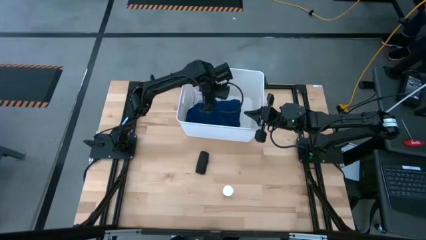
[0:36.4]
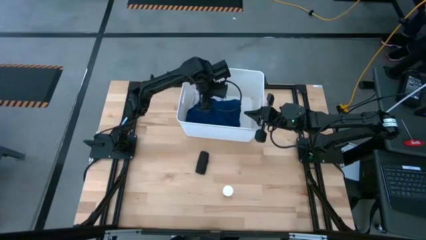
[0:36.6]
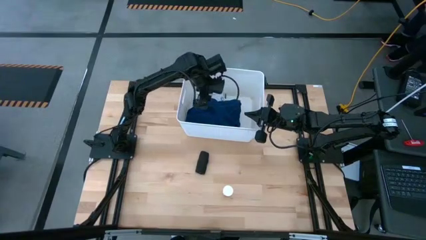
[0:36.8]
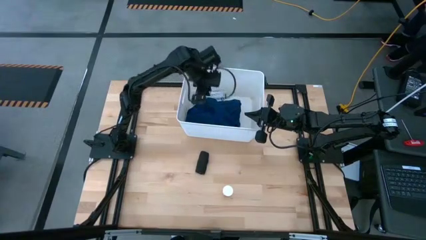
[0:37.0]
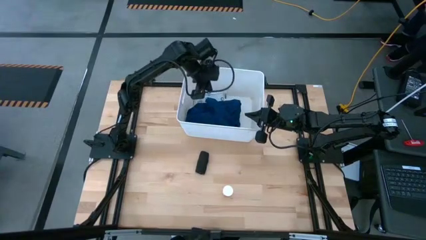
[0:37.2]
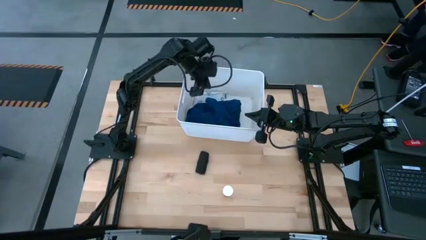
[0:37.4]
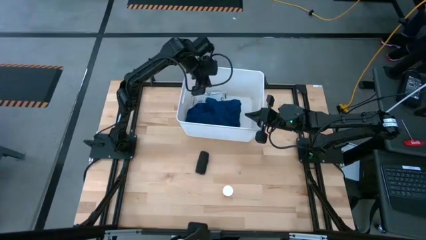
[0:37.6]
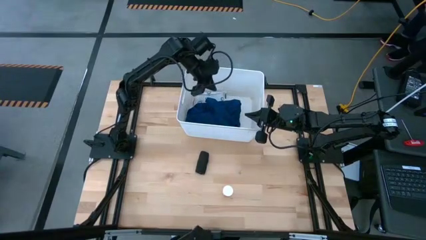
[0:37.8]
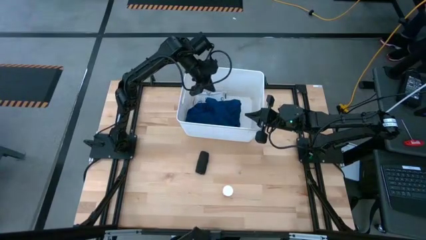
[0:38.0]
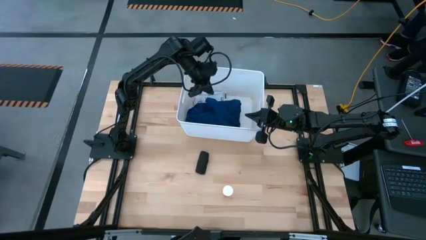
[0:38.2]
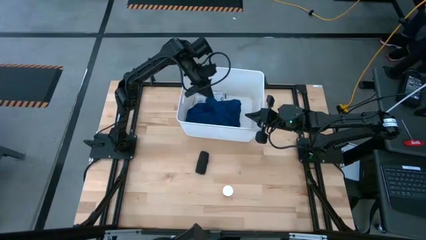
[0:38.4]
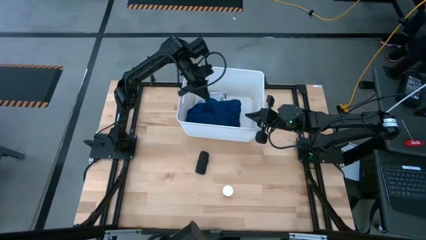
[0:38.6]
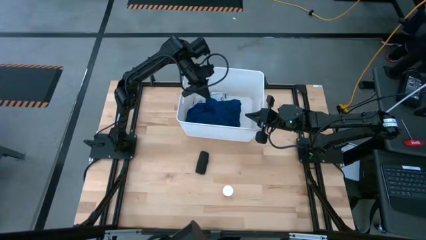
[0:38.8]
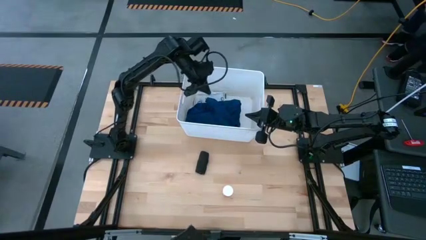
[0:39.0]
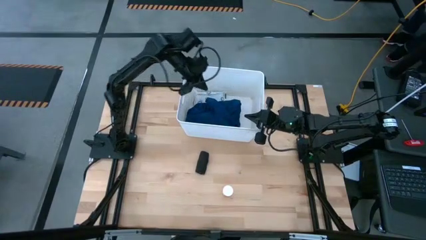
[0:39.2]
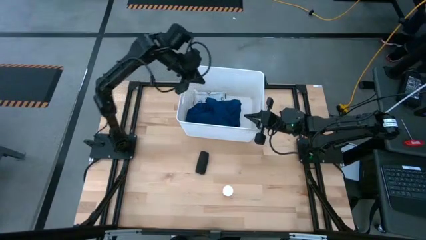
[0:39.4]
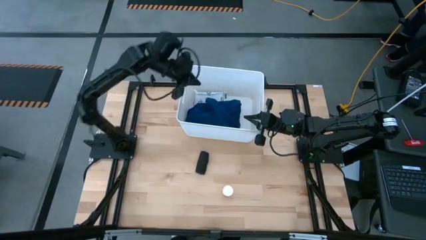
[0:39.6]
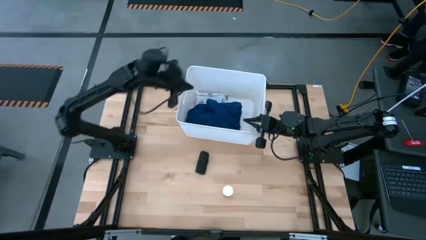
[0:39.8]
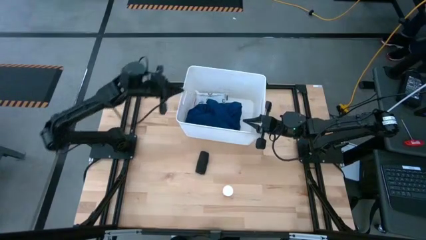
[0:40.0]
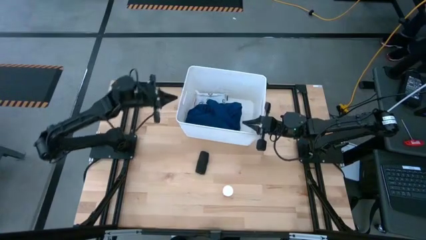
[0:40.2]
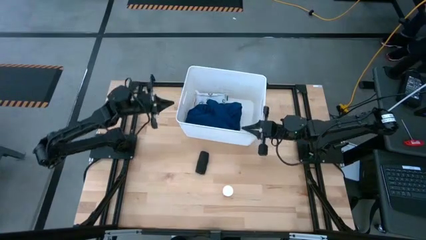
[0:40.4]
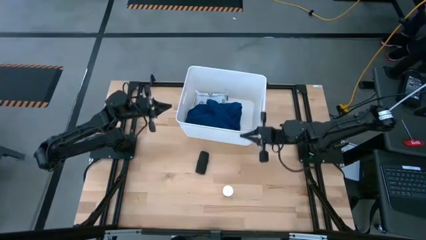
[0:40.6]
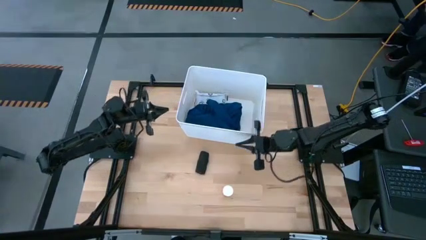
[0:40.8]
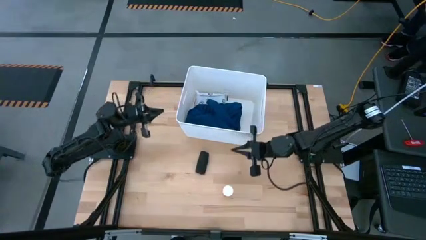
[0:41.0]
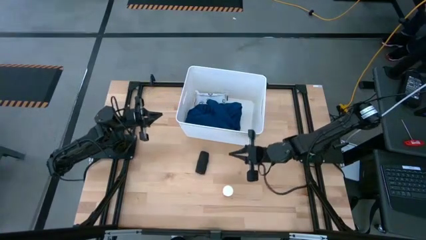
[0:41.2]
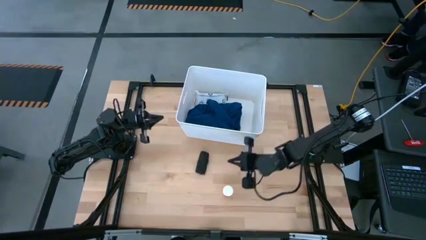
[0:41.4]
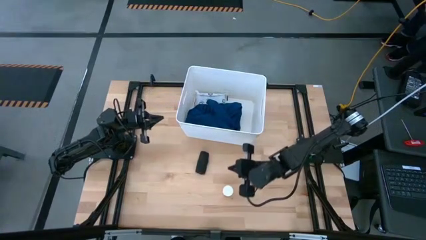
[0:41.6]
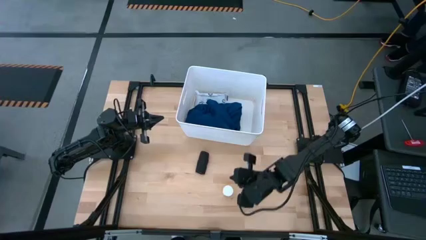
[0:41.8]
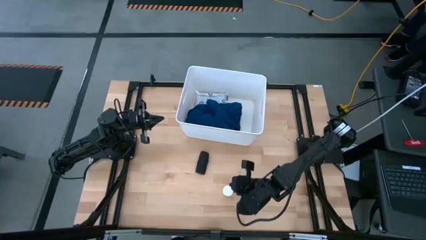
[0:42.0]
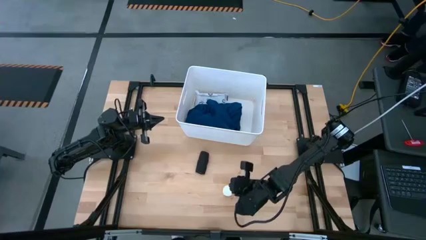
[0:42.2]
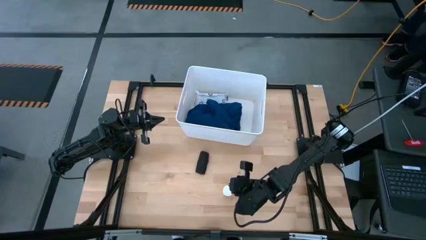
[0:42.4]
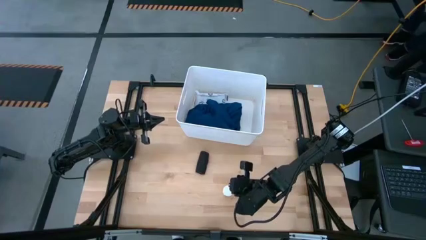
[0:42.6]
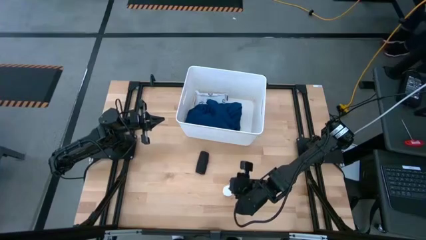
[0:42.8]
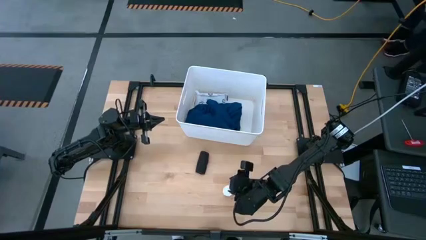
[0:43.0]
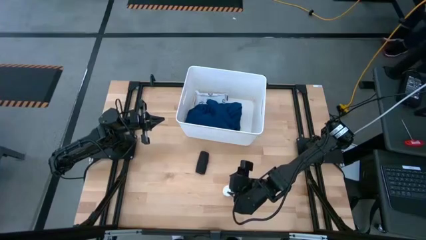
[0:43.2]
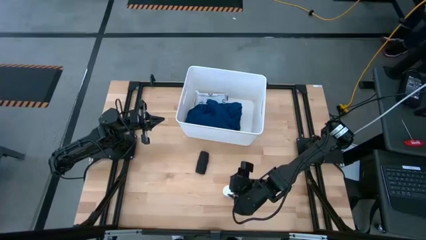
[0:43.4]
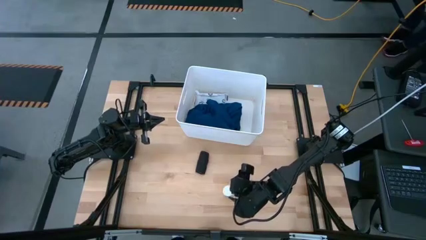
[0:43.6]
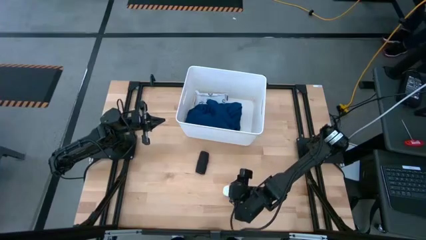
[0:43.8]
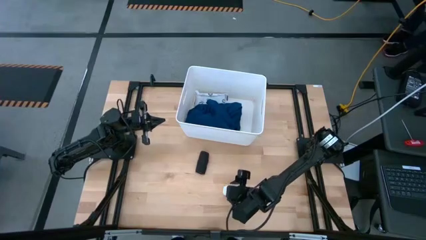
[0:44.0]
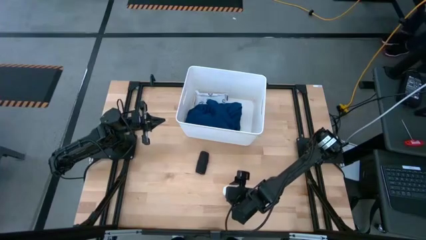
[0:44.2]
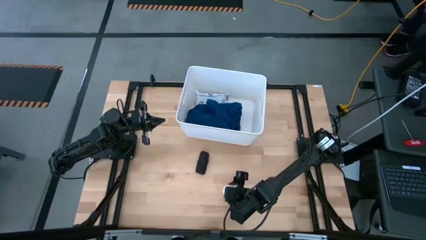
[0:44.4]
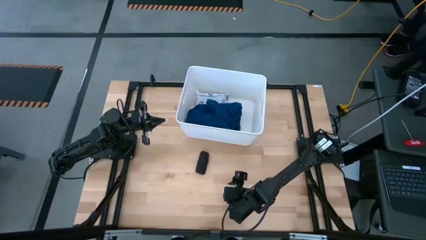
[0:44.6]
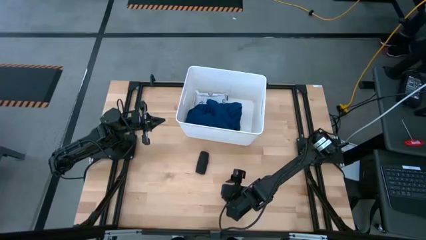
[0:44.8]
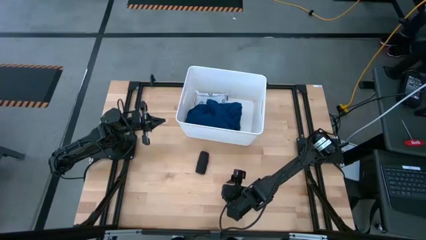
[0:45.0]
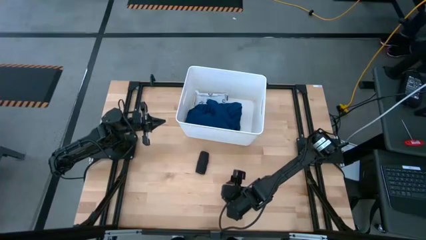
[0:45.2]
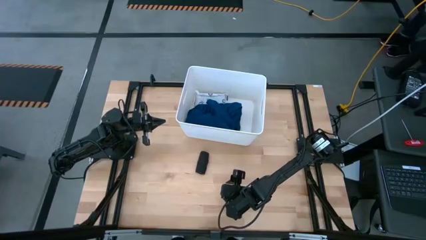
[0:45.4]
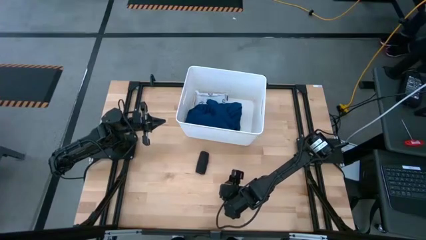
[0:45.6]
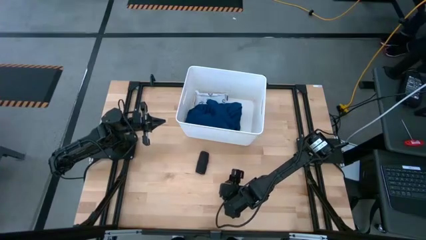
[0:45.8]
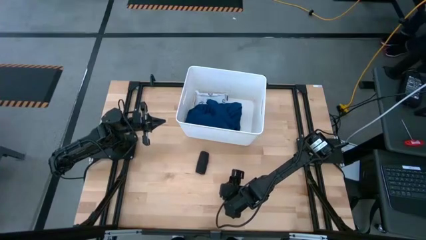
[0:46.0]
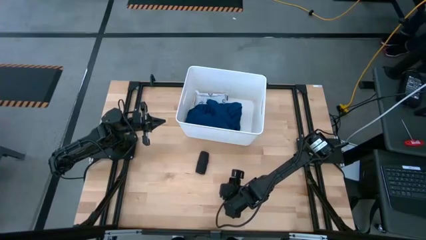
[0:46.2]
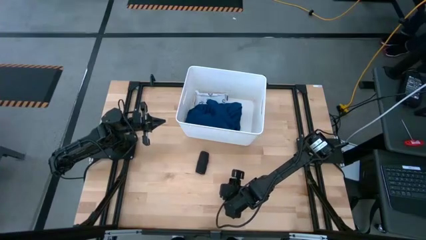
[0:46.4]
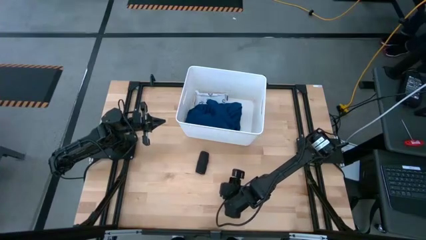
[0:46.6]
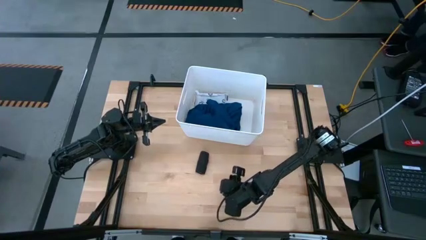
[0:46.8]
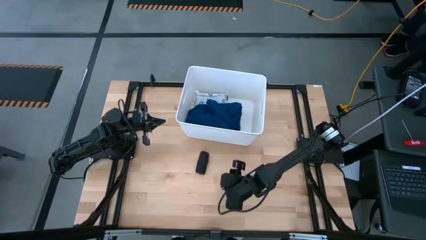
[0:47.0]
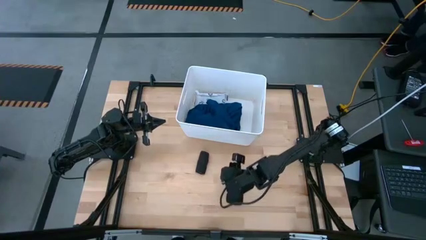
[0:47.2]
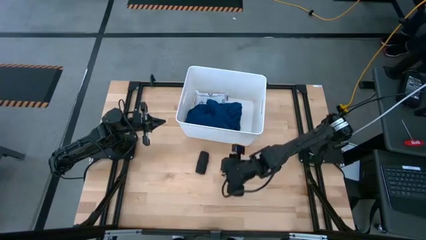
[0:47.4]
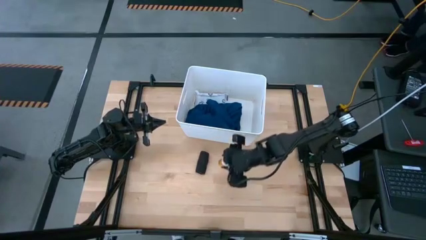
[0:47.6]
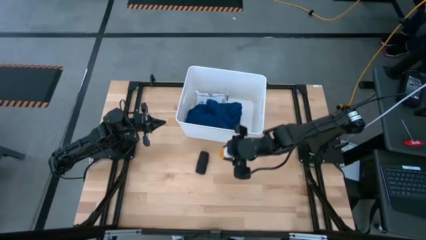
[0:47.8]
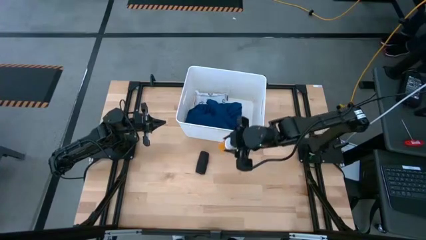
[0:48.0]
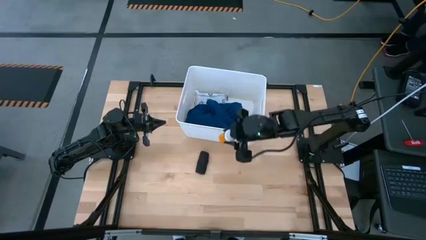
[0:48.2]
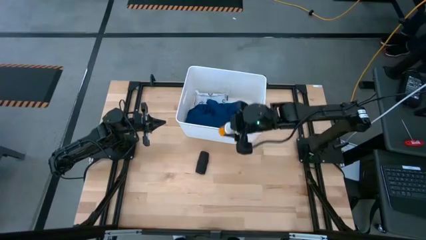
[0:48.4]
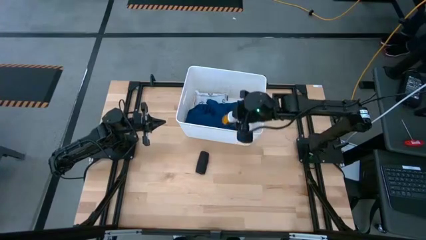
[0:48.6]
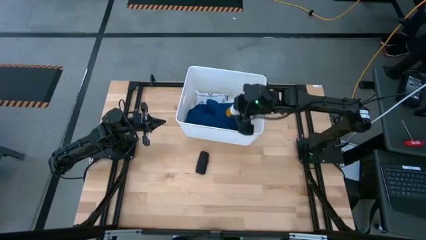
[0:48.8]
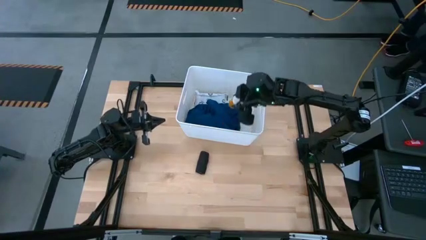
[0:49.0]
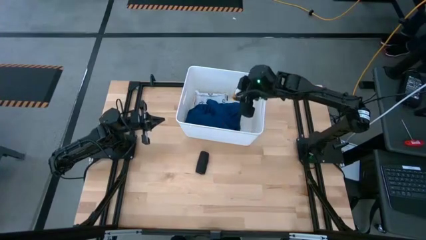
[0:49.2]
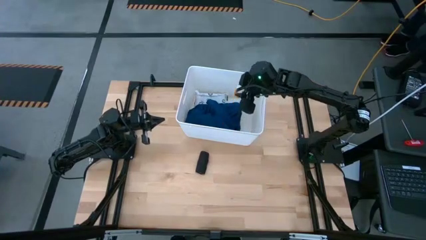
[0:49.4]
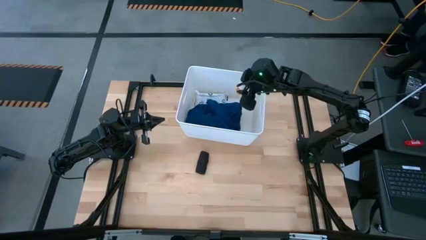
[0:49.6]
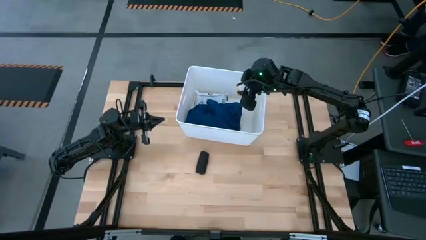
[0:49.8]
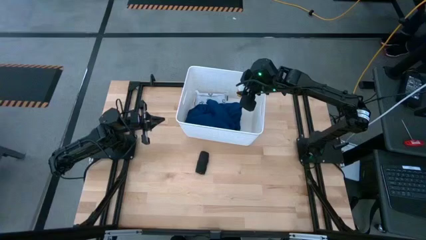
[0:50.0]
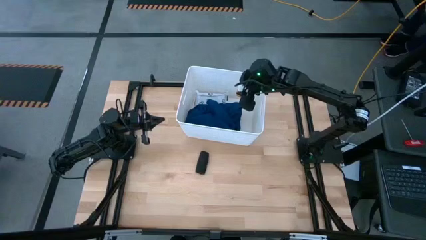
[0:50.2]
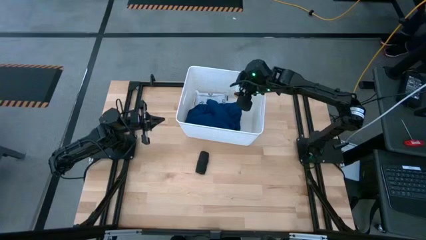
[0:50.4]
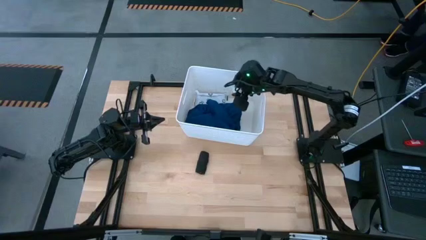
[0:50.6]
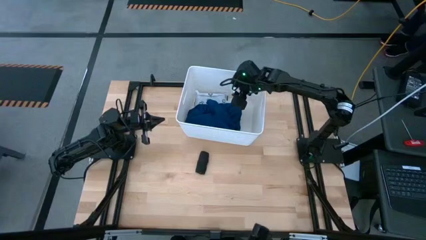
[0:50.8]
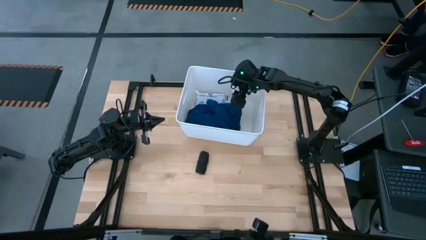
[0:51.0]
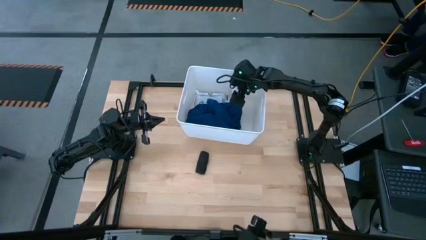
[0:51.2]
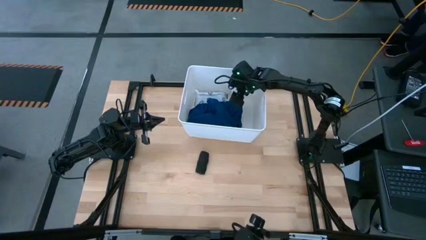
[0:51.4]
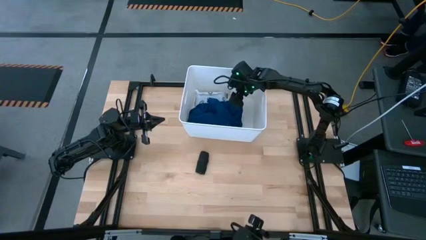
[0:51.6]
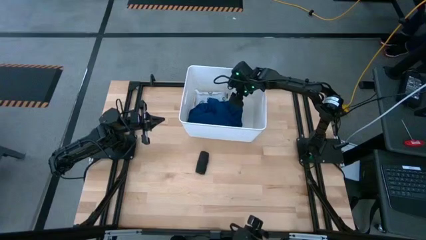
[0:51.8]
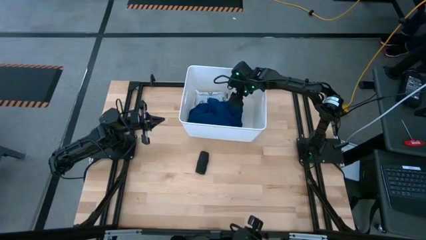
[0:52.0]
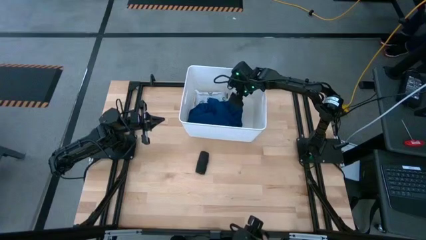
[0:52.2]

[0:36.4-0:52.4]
Task: Pick & place medical supplies in basket/bin
Put the orange pill bottle into the white bin

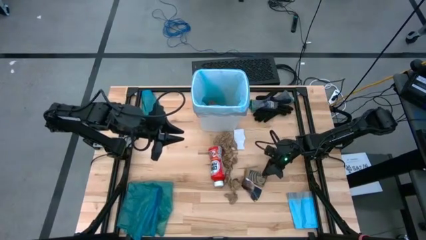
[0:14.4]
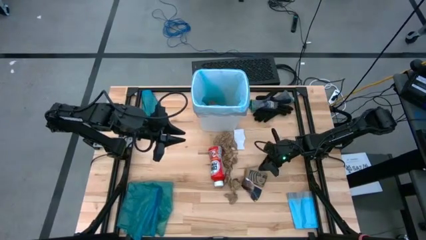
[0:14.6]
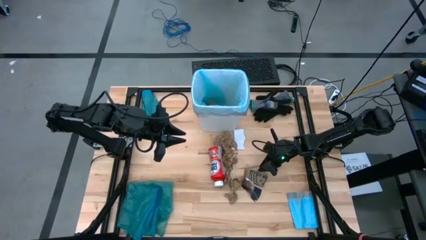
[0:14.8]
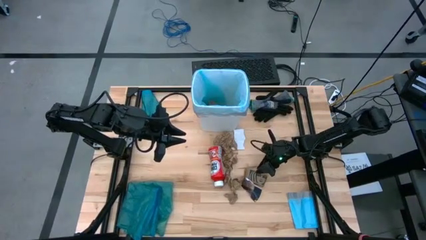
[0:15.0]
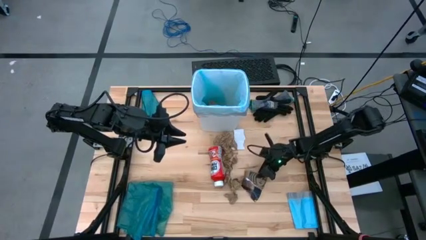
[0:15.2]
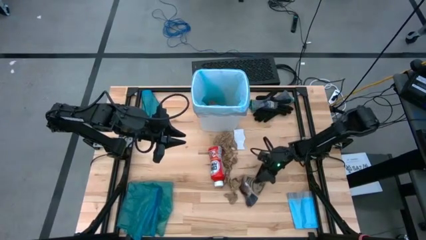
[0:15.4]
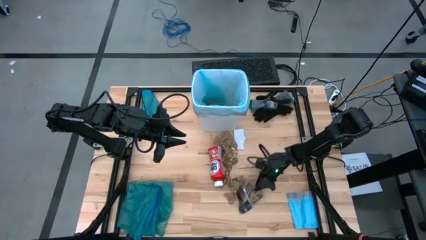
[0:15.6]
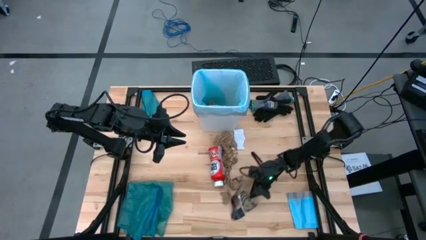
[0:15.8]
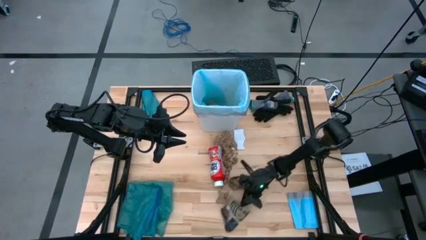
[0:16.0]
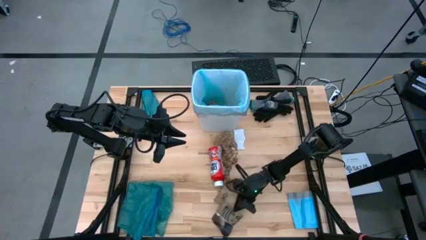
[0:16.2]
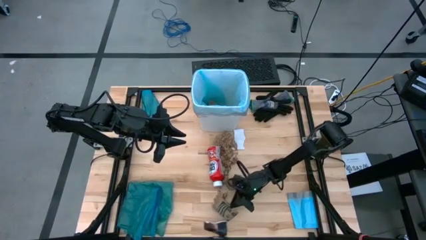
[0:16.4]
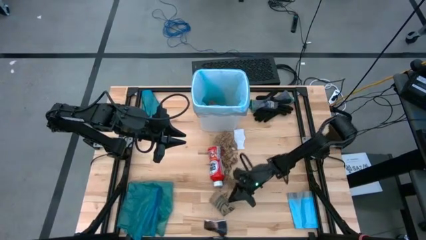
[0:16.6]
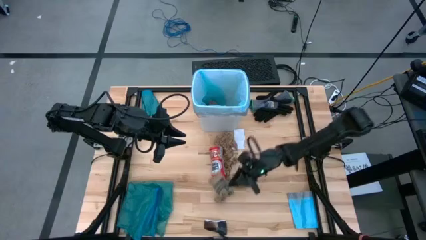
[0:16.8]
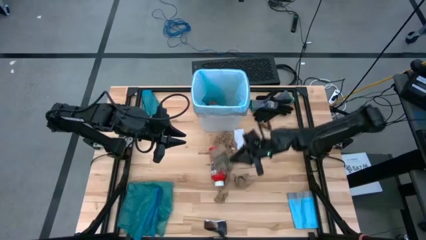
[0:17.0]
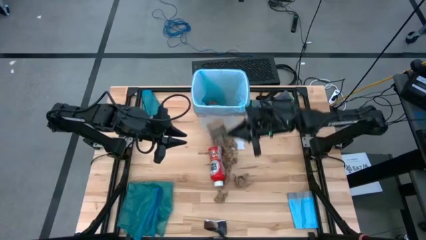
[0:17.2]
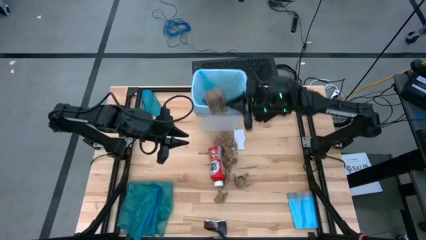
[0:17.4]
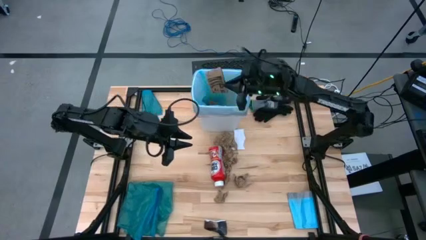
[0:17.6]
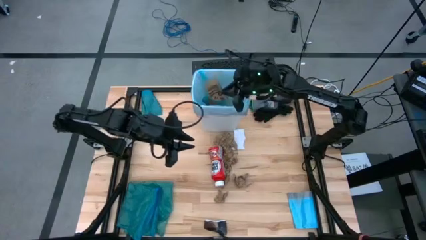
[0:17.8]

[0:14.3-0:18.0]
Task: place trash/remove bag and relplace
Put the brown coffee sleeve into the white trash bin
